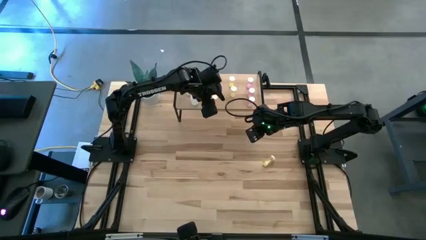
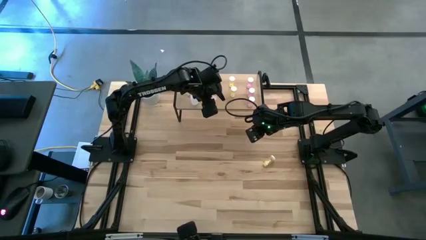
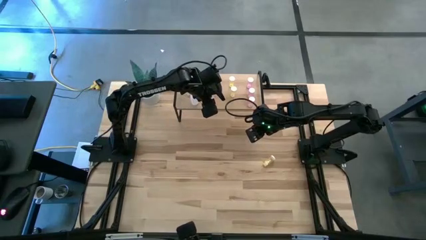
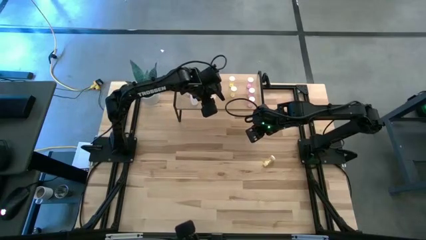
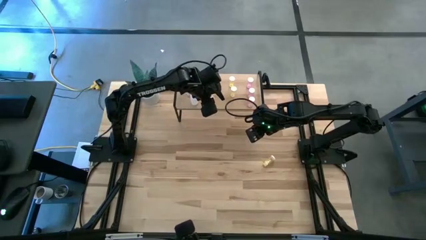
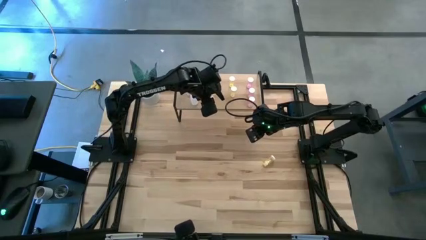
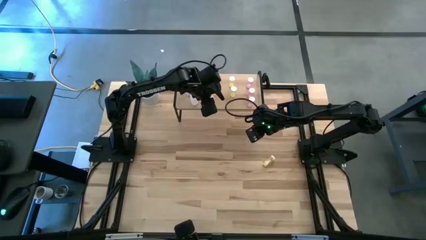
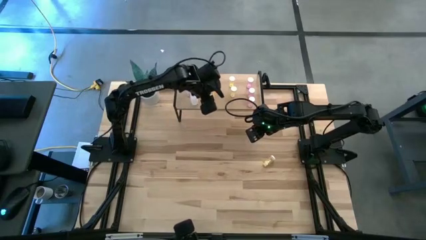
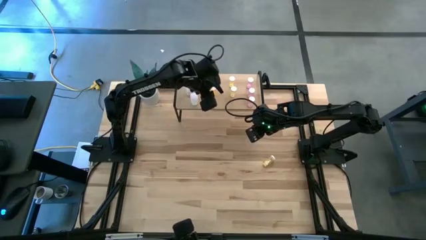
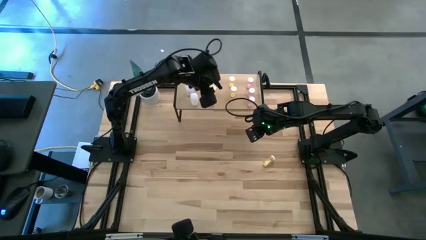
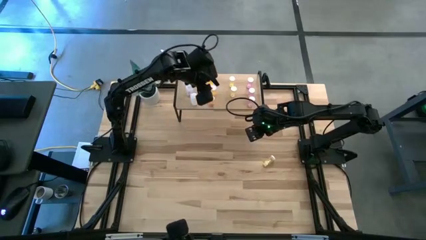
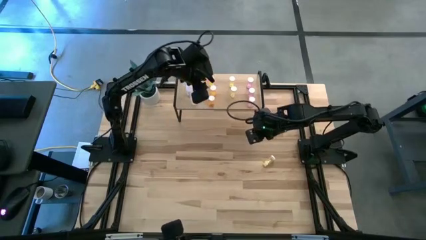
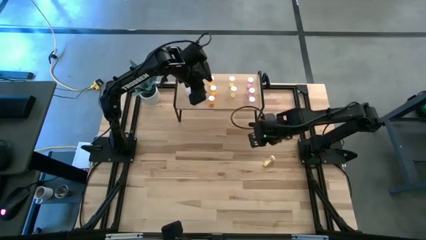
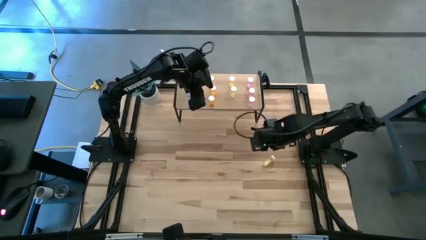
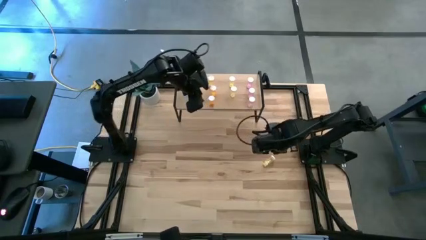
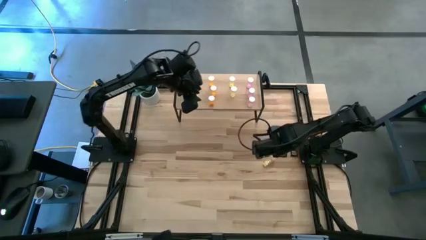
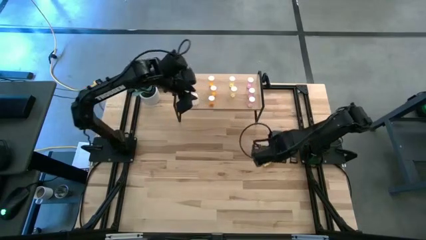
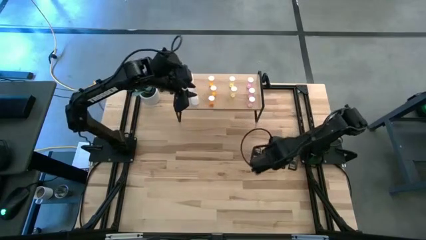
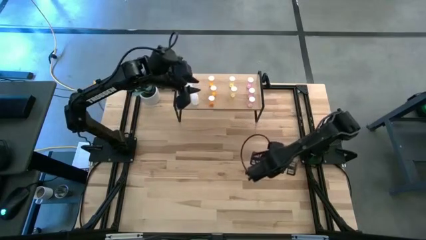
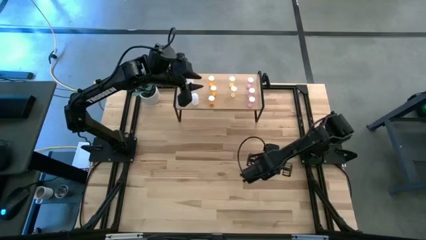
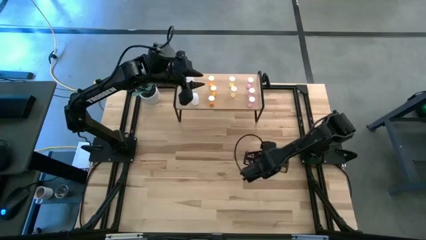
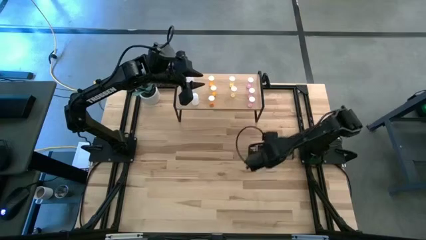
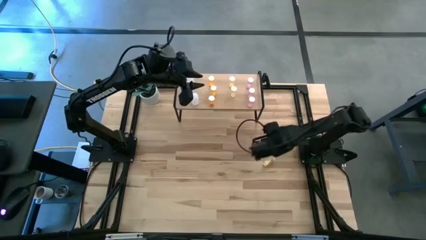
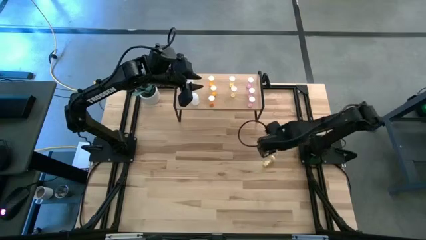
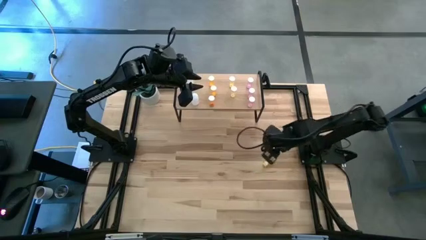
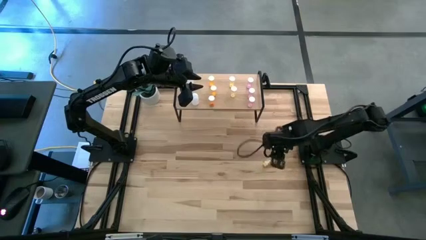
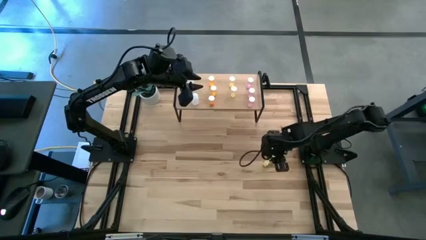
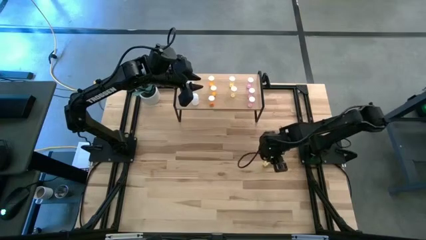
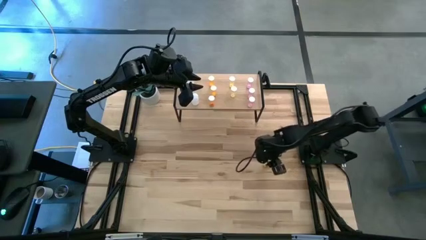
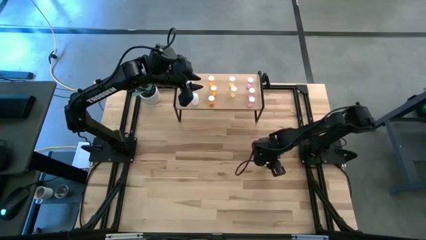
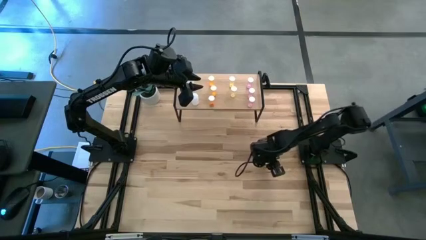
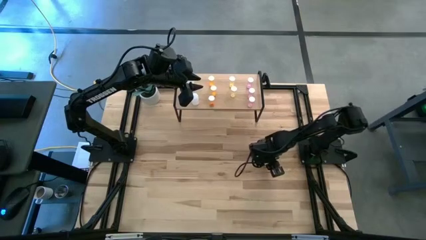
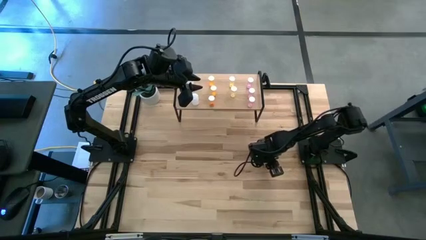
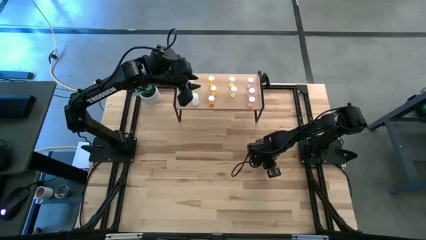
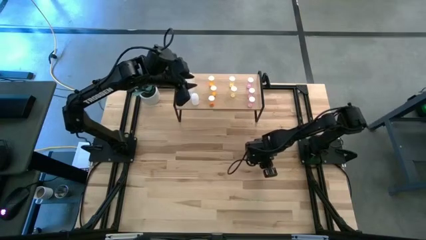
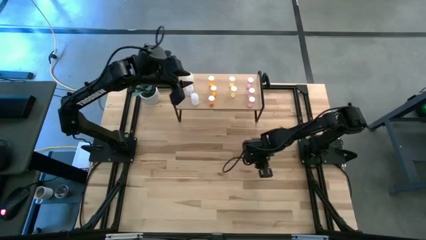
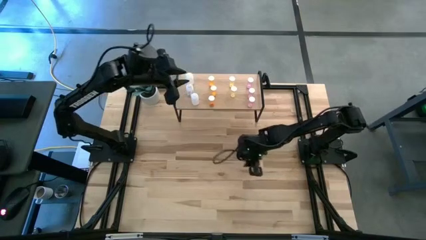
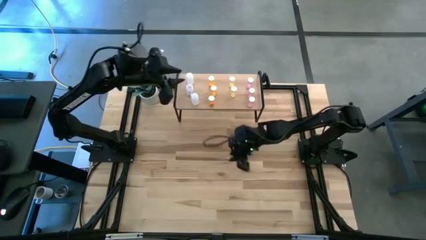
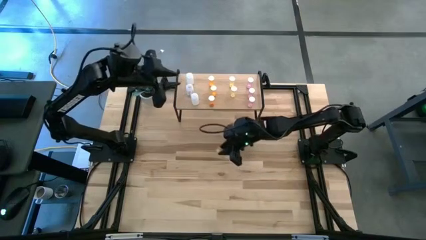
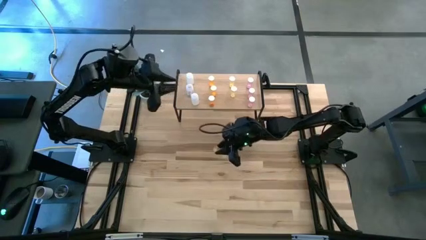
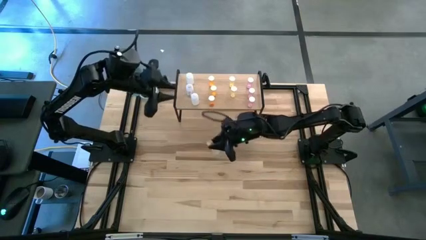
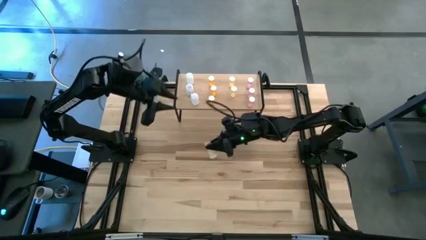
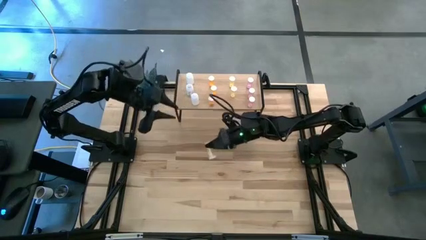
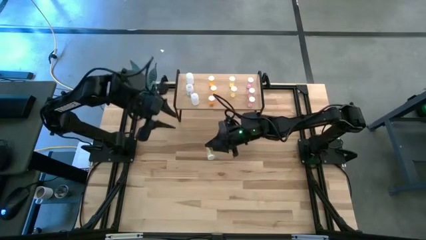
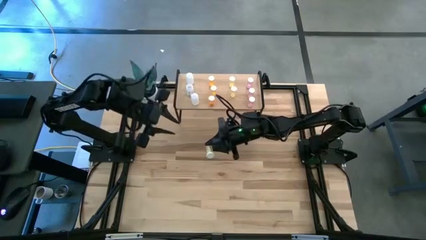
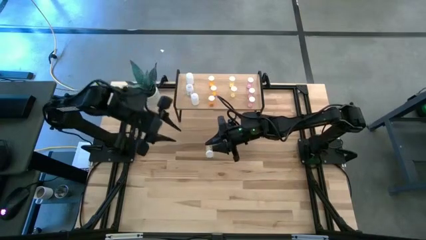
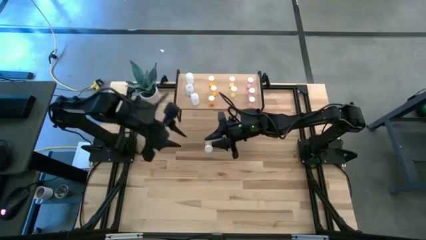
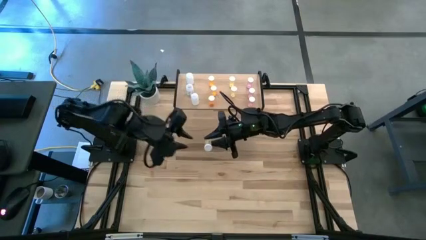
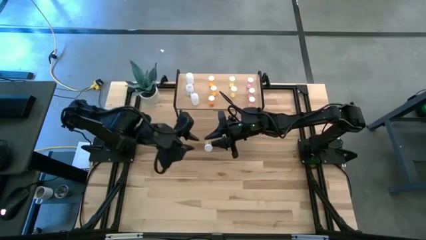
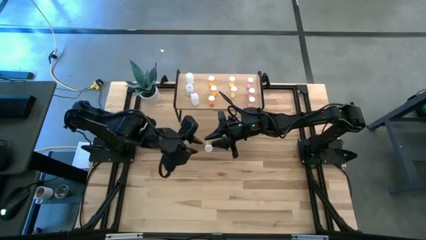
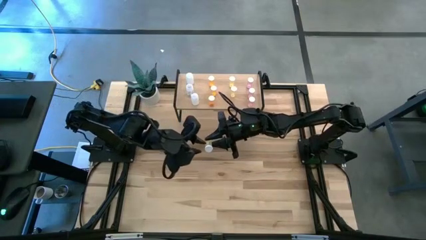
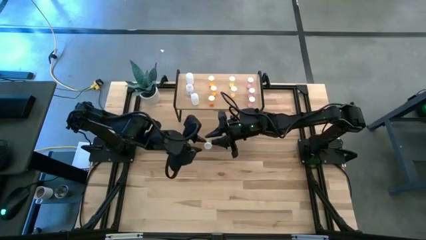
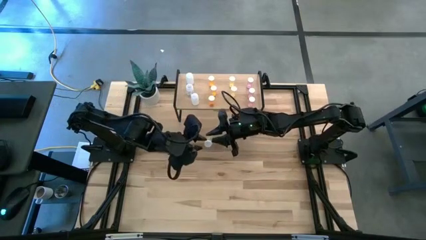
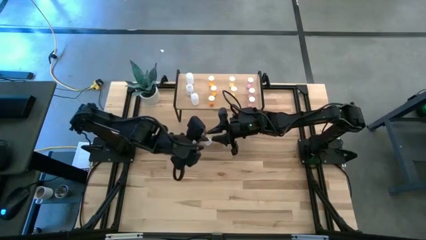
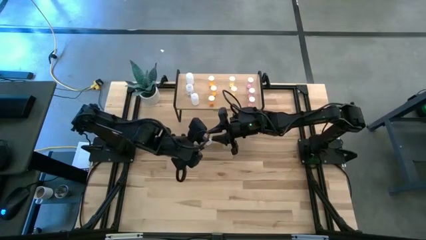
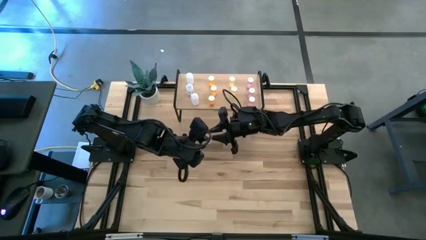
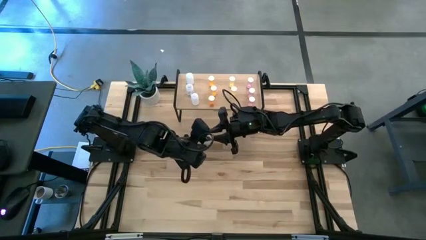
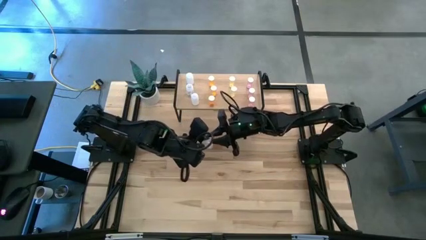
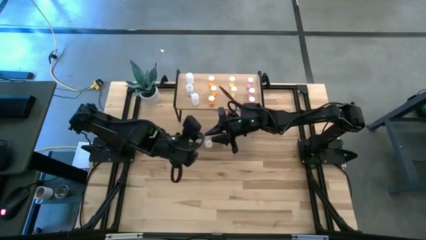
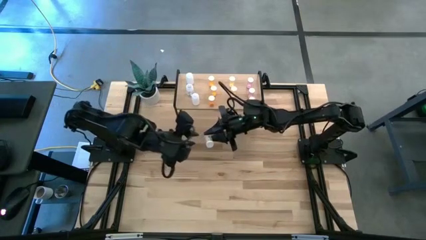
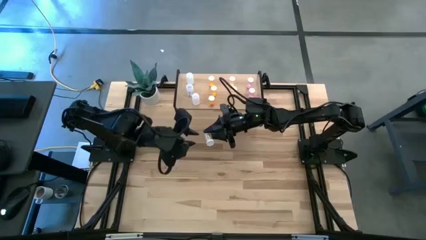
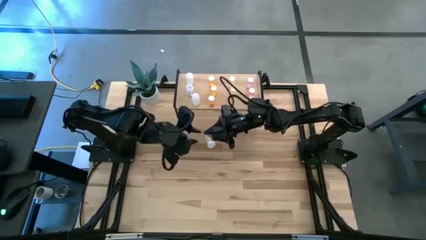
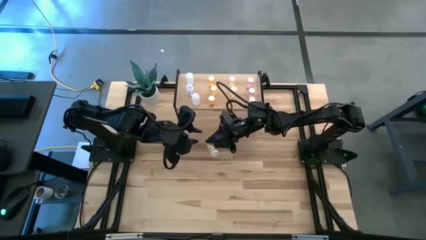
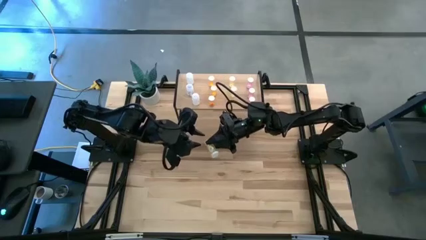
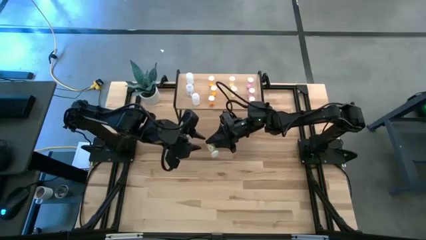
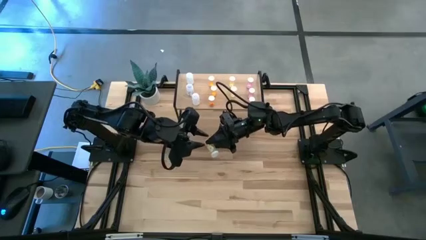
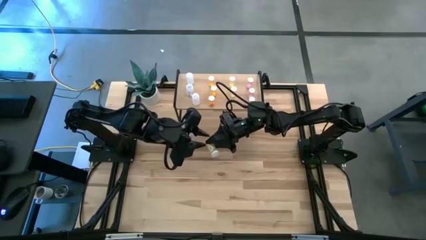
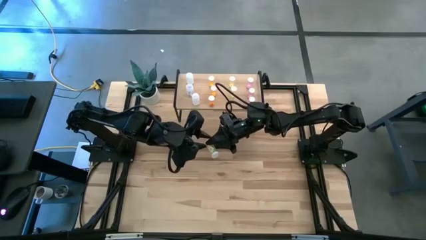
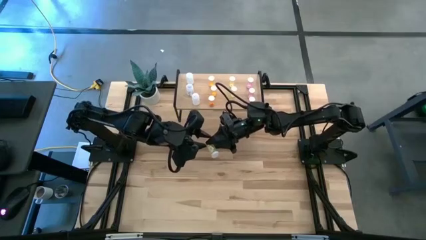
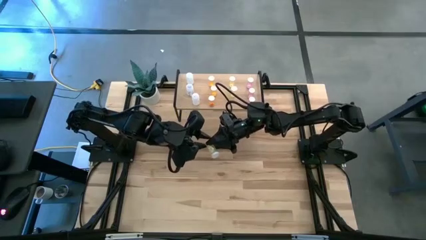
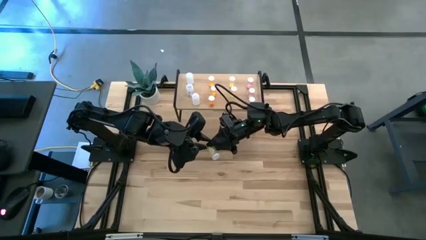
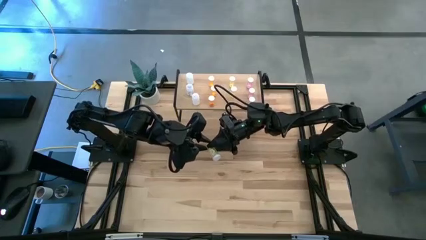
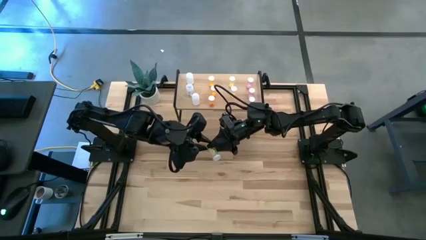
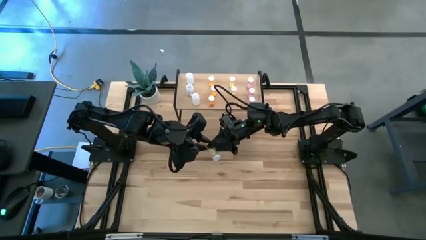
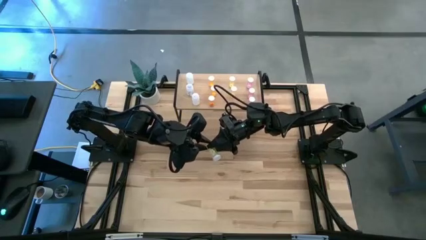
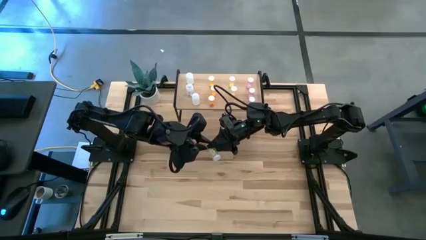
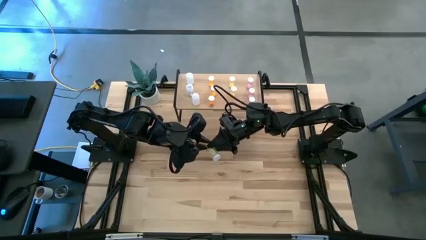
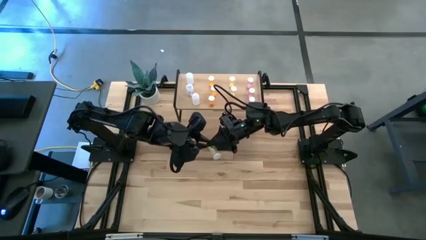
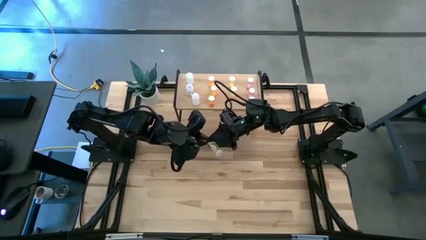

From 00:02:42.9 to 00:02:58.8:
Task: Pick and place medicine bottles onto shelf by color
Put the yellow pill bottle on the shelf aligned with the other yellow pill bottle
